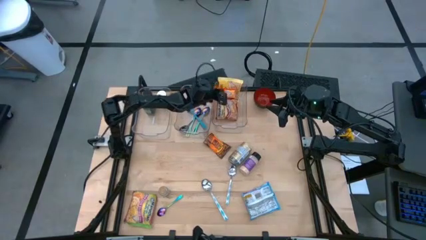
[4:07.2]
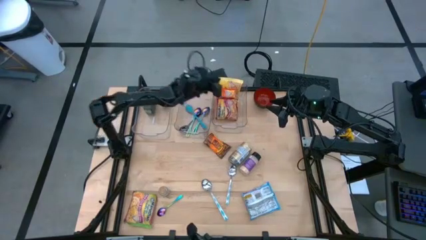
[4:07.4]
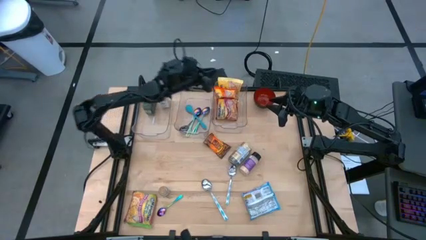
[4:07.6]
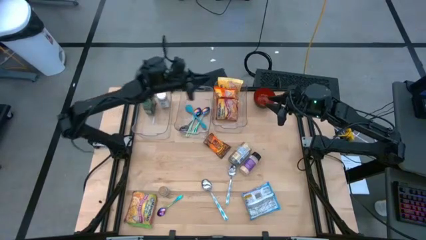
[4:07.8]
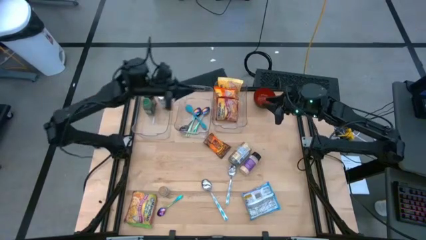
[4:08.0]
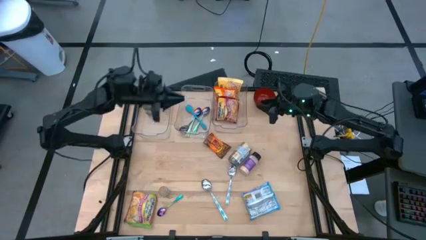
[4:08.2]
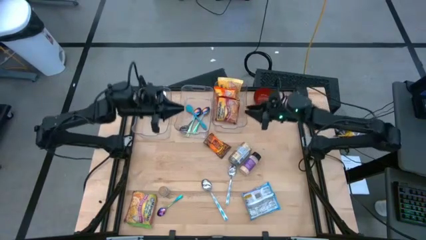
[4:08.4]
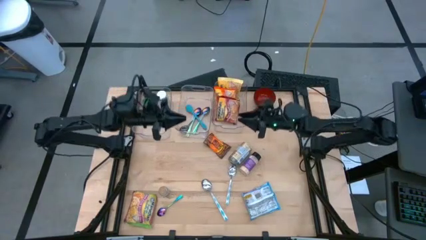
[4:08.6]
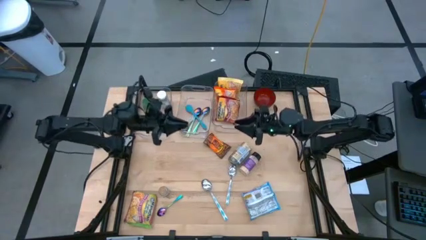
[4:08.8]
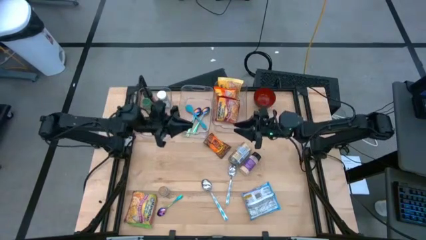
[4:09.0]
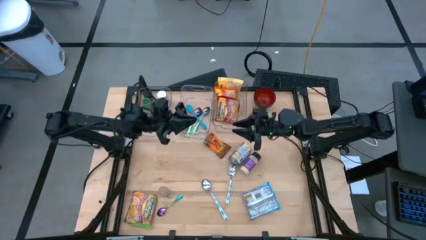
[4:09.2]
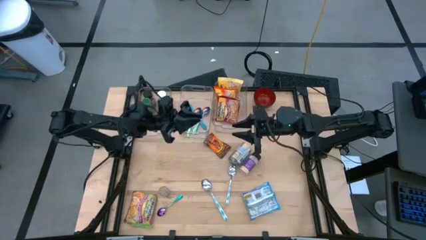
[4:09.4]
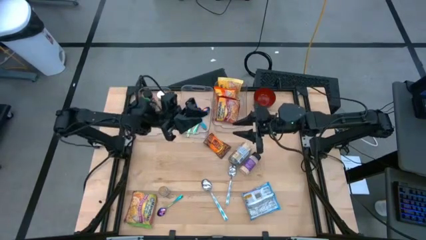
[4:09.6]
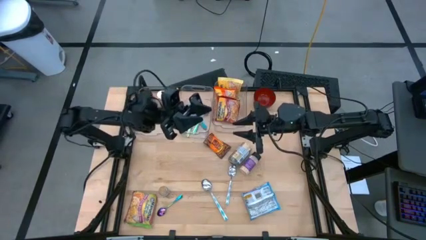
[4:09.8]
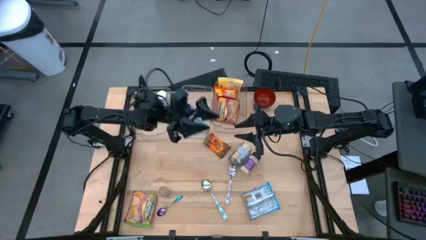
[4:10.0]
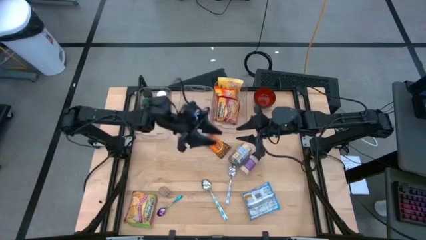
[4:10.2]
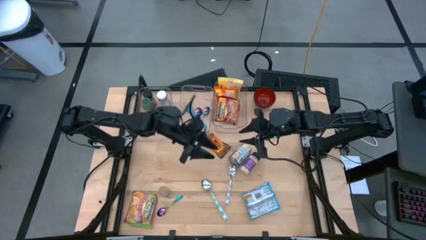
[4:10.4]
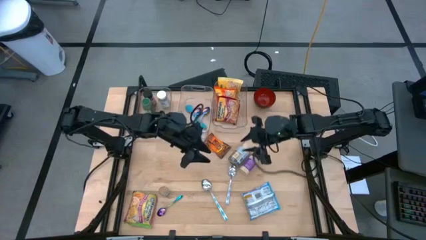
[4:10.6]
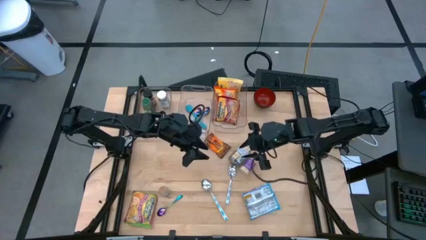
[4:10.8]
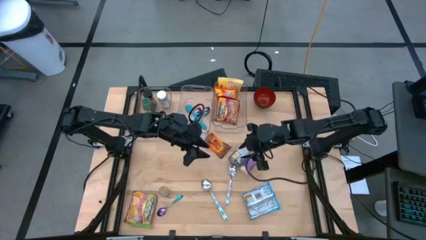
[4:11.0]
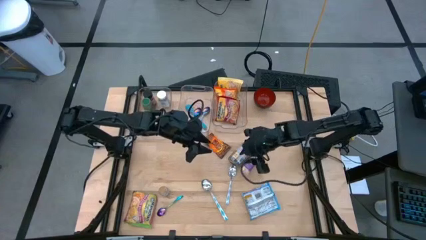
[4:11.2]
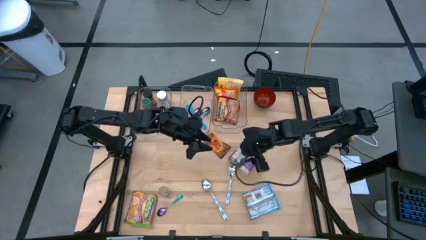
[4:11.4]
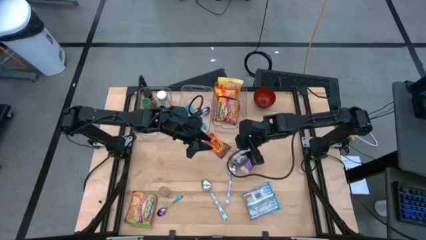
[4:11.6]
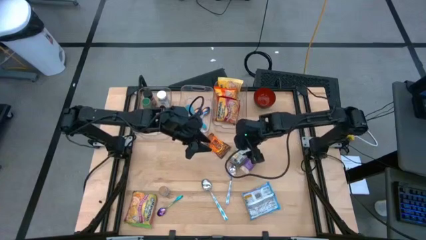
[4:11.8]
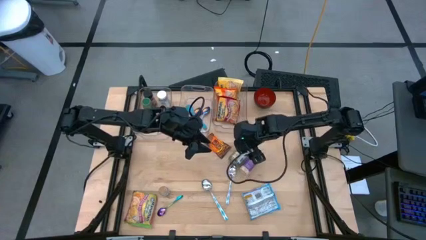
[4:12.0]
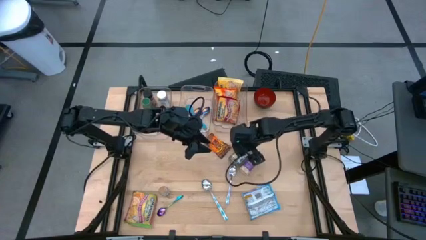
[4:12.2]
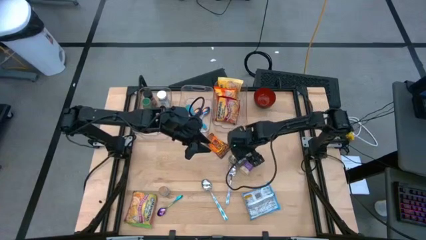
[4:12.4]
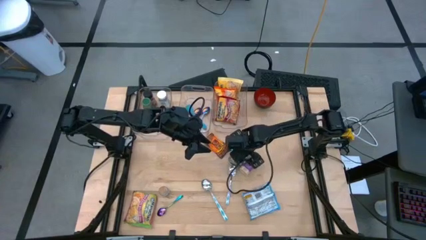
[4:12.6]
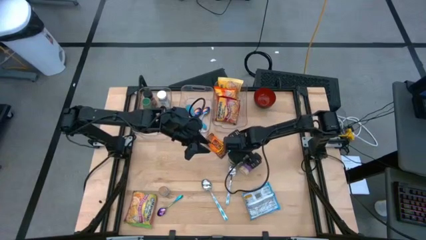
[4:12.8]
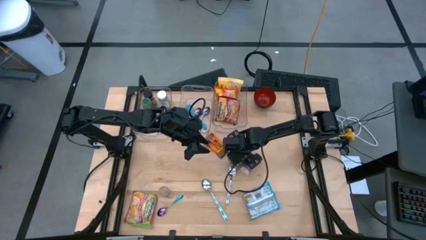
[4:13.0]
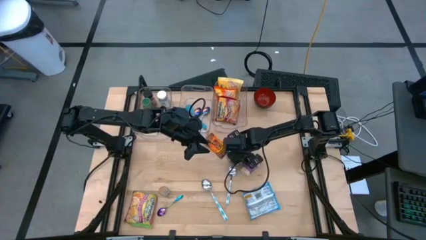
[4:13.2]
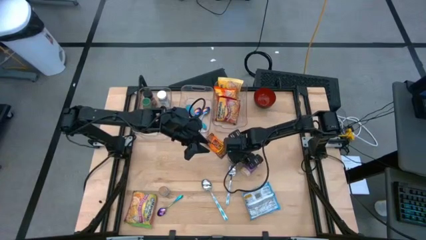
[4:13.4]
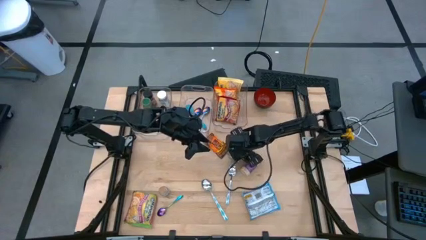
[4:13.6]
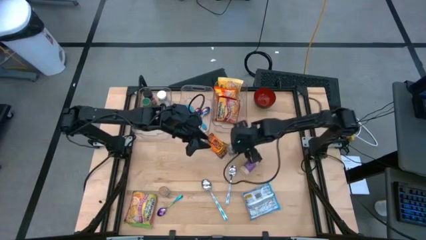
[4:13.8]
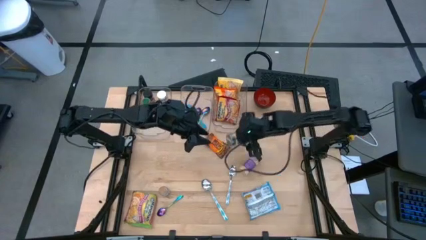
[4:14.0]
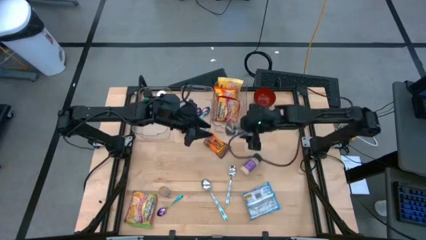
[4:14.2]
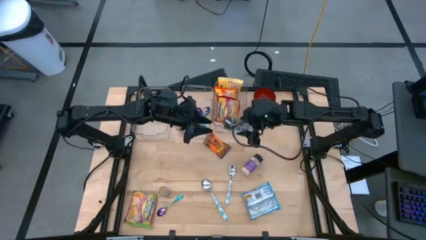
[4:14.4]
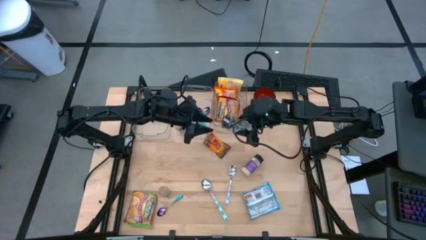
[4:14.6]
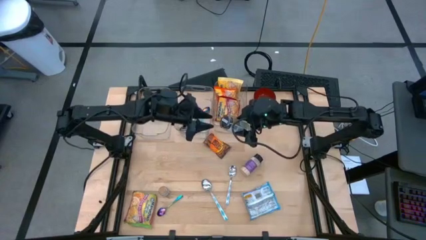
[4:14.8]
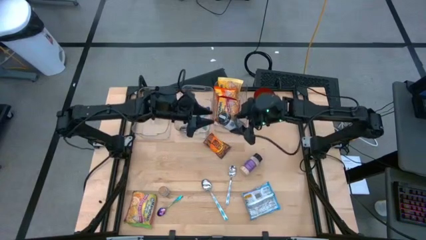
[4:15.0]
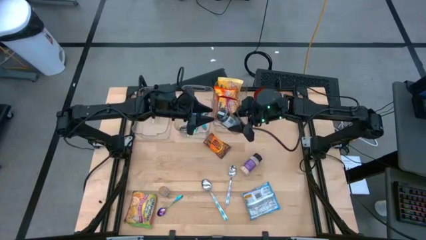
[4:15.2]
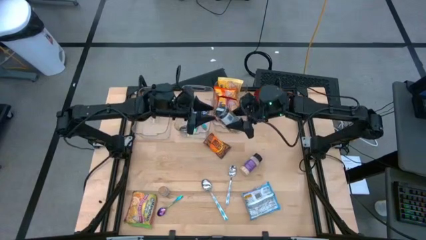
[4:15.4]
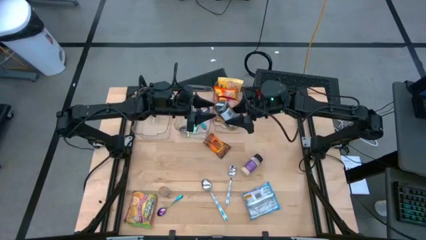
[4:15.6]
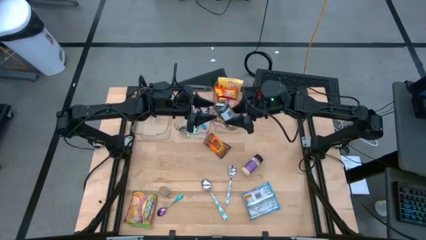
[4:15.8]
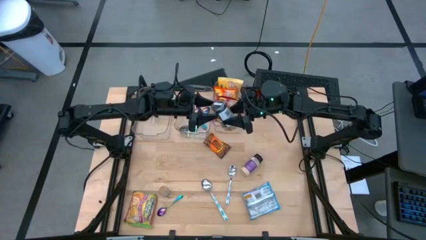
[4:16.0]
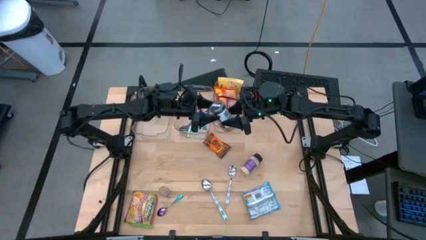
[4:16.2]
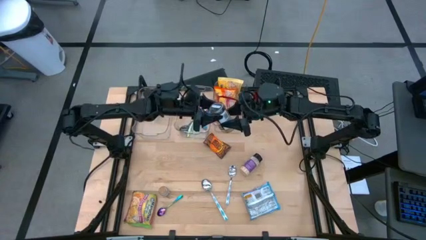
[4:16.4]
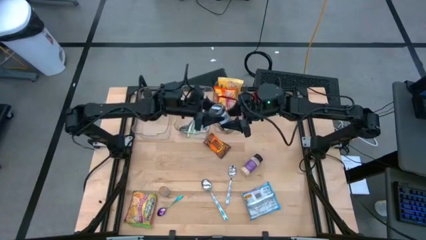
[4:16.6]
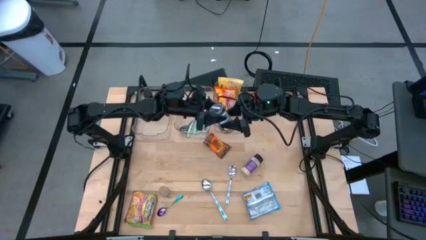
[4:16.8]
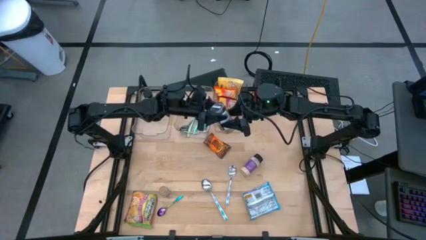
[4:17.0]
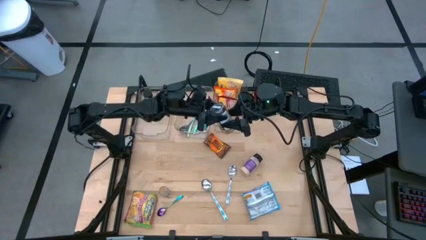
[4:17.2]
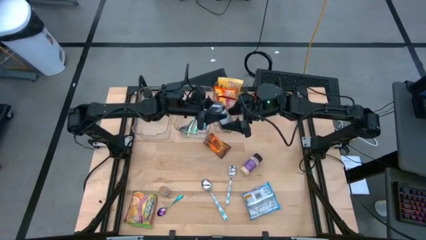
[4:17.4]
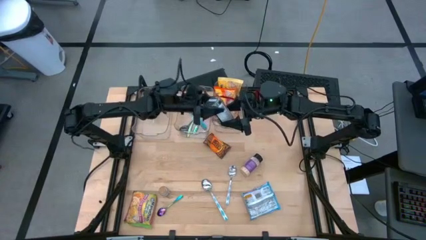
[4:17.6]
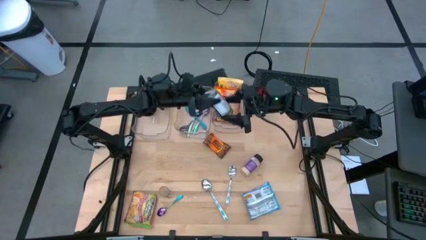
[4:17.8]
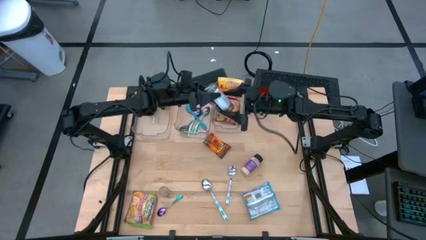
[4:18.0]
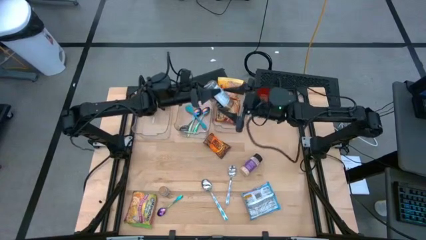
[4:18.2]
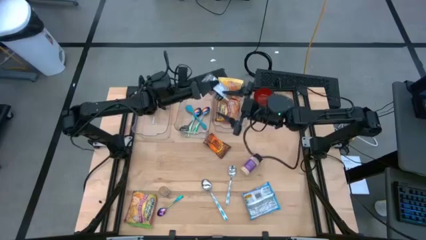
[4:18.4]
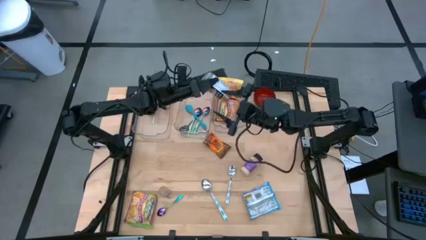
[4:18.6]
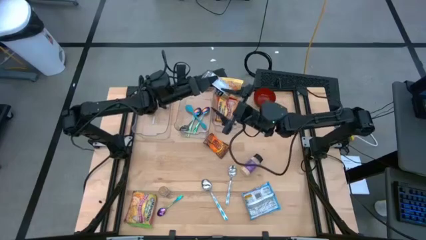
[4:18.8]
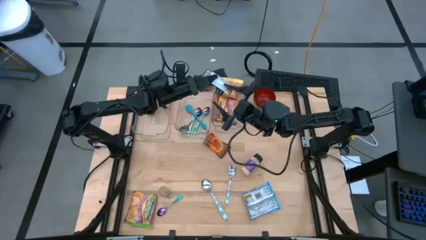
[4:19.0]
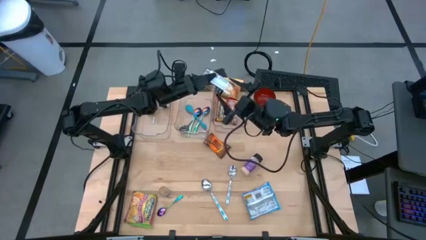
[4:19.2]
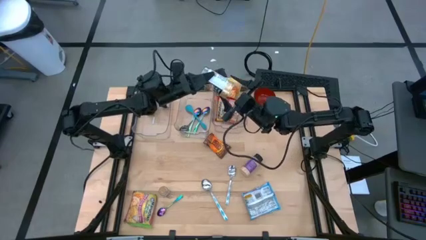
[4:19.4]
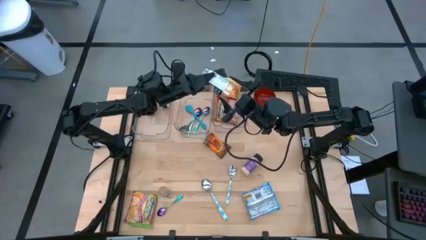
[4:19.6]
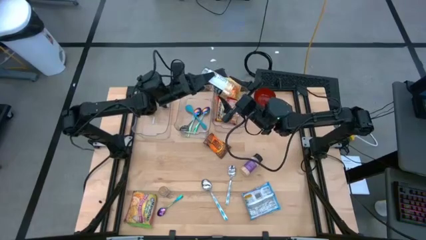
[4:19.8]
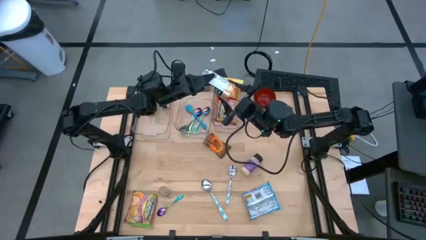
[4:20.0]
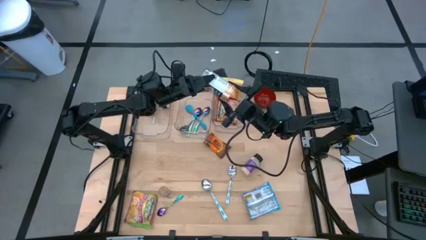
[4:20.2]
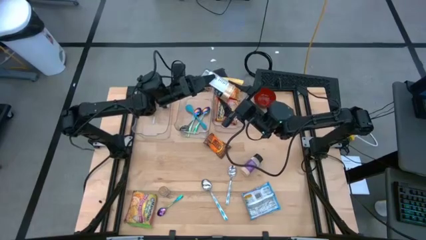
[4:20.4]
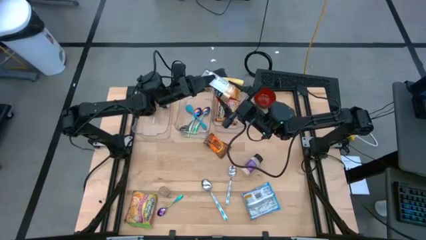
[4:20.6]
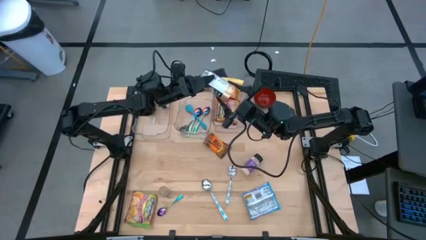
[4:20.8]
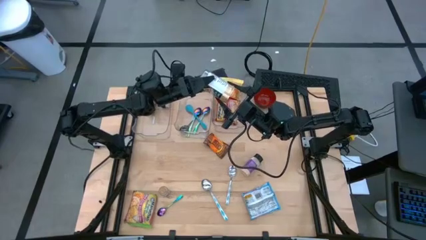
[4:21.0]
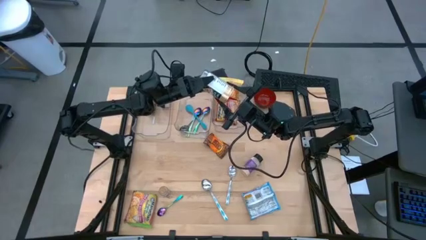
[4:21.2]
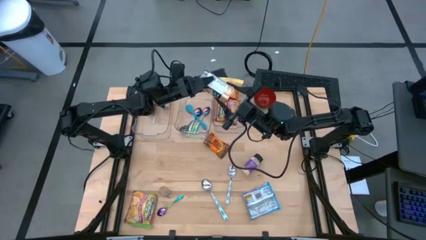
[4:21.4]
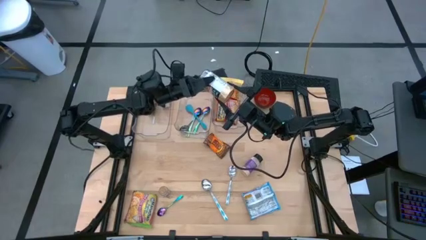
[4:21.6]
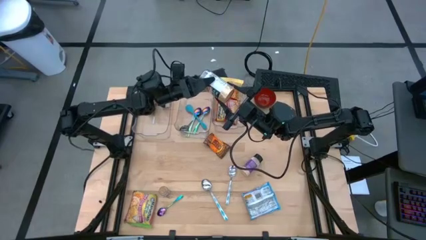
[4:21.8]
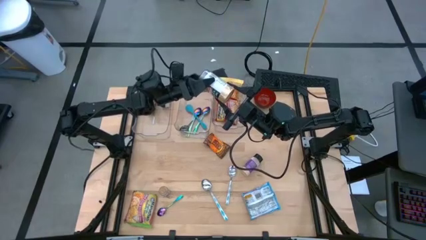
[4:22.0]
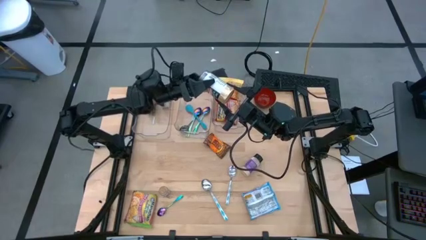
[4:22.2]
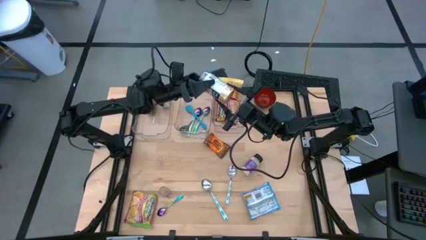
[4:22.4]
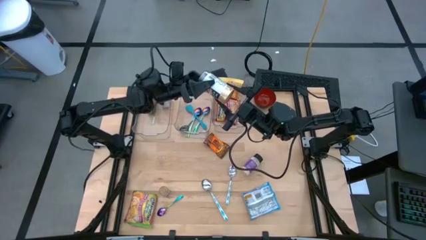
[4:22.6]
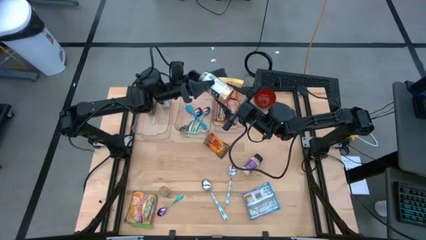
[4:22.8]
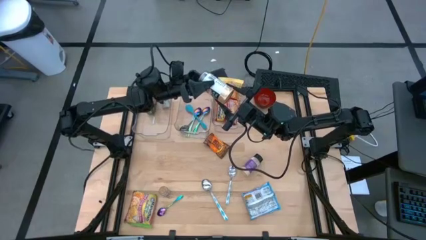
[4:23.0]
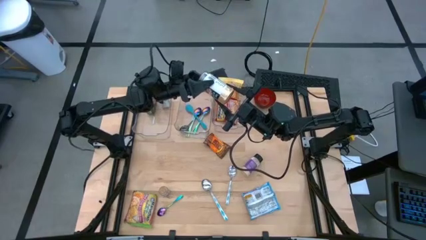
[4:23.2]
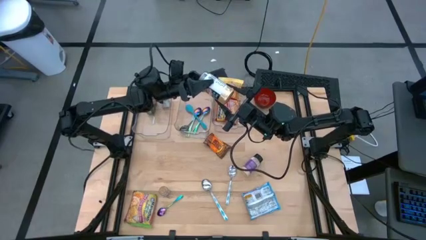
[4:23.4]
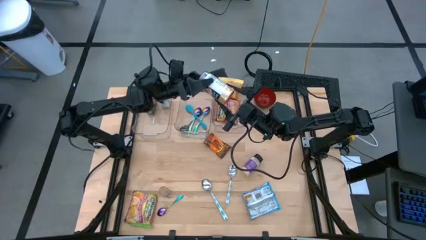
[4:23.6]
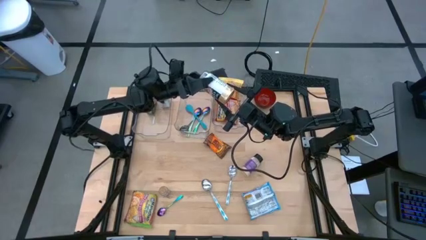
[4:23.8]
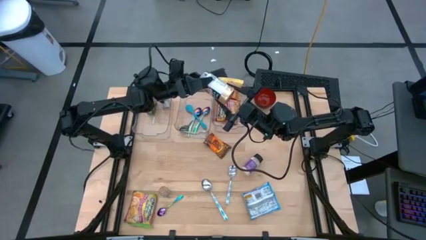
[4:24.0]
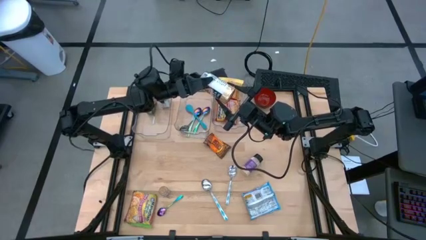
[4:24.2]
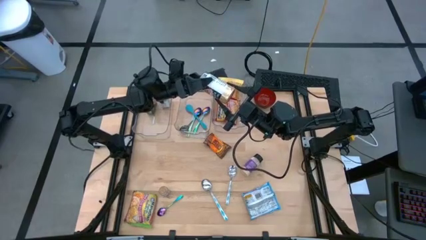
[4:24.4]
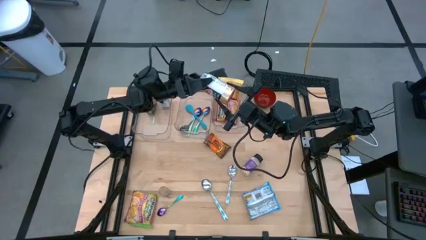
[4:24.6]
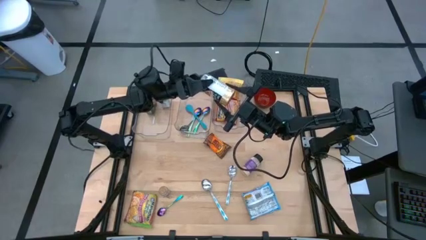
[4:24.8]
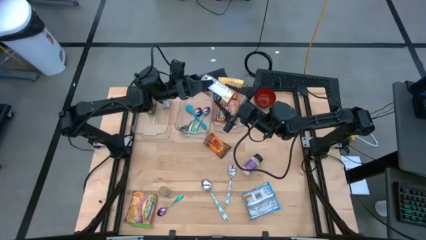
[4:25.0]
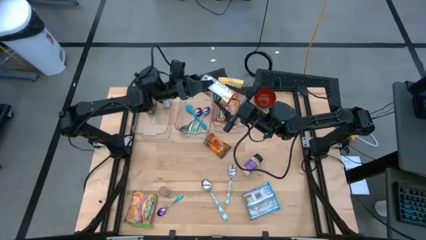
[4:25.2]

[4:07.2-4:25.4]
Task: Pick & Place Food Item
Put the gold spice bottle into the left transparent bin
